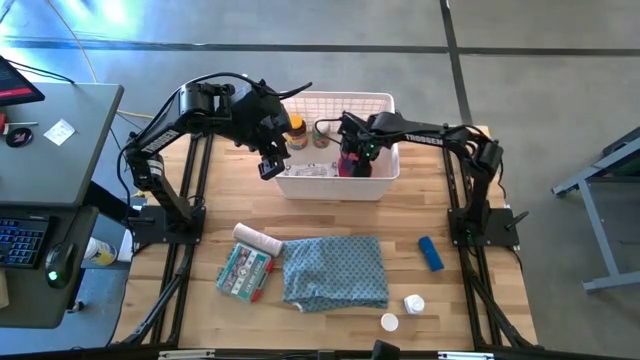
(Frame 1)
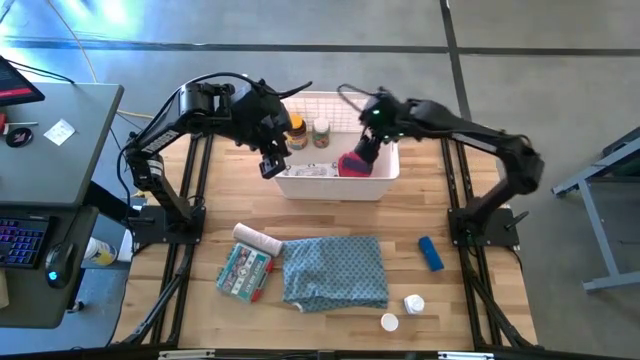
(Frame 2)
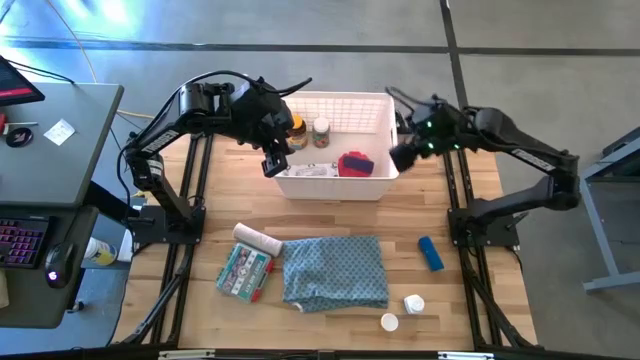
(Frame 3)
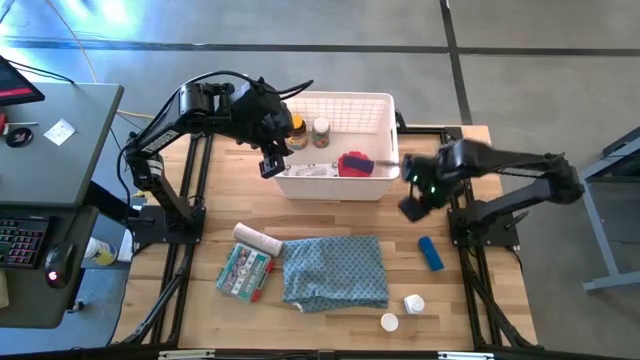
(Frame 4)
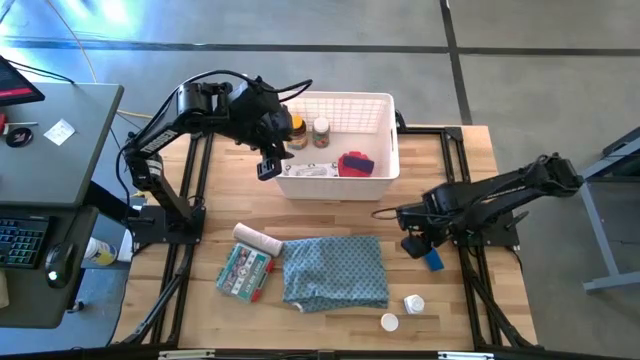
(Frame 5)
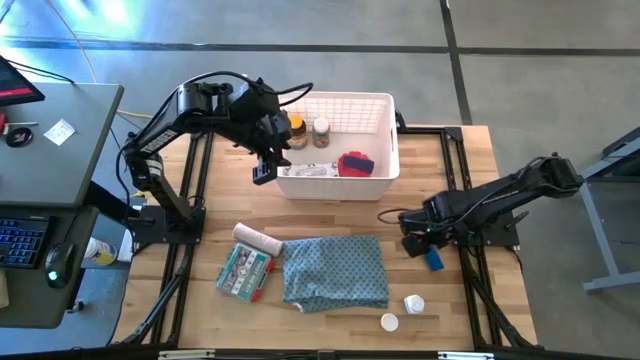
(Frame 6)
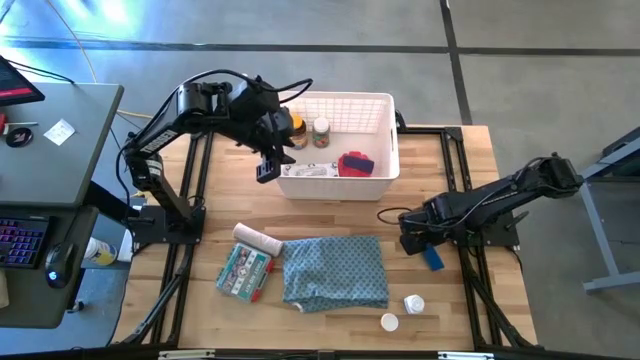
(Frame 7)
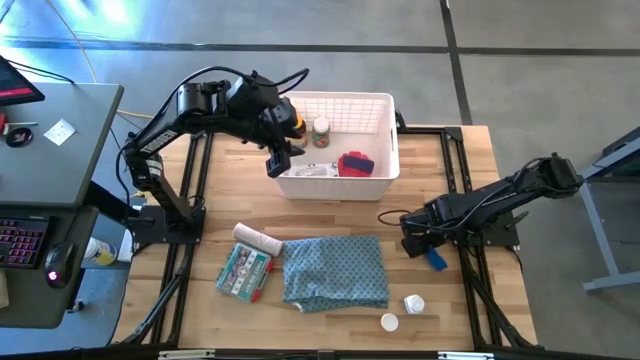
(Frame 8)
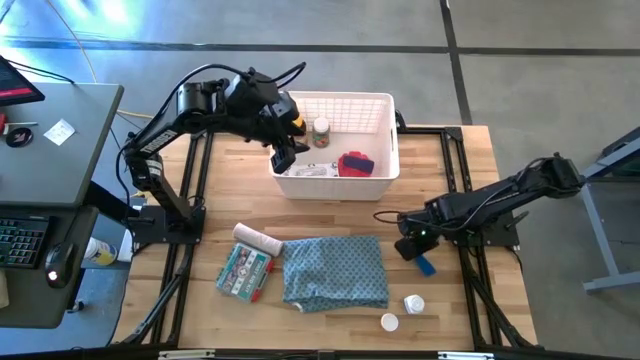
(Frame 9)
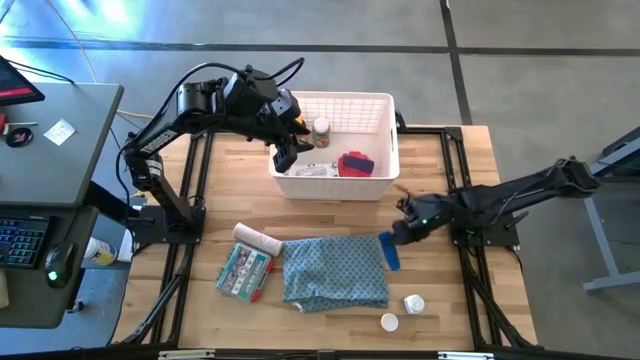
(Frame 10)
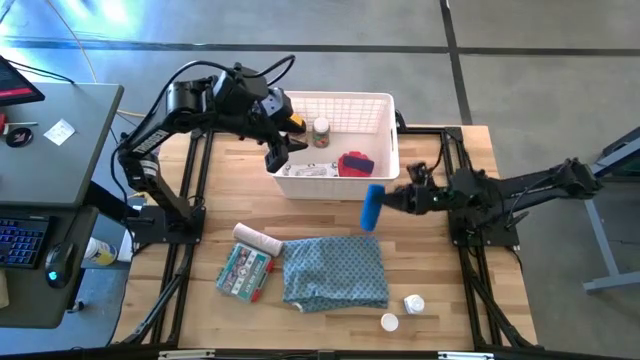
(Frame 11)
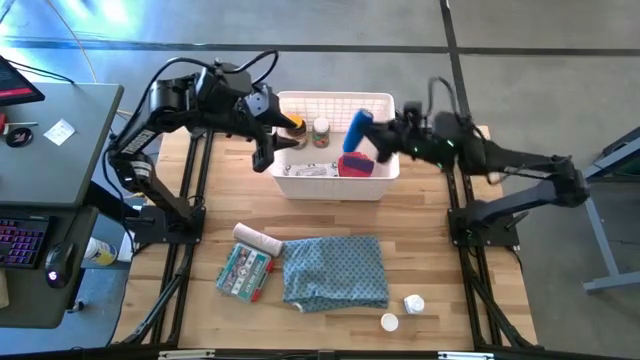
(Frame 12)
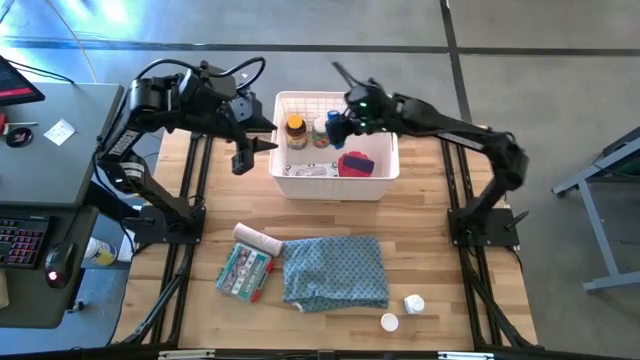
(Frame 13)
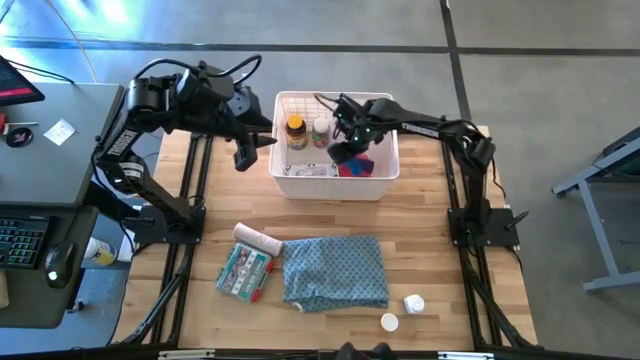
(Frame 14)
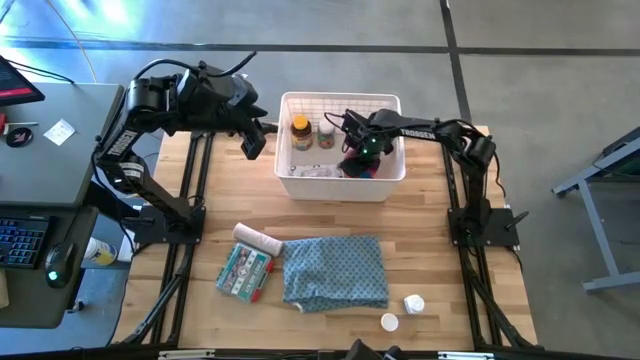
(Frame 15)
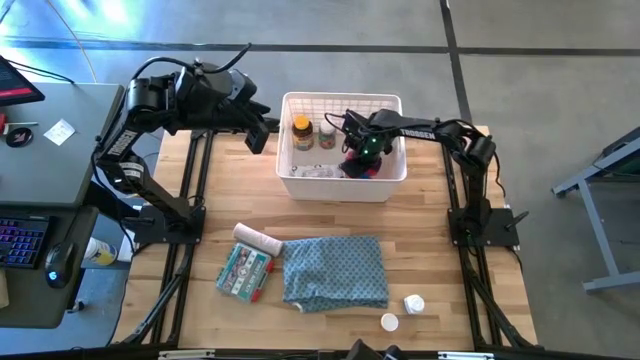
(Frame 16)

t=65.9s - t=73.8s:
Task: Pick & place medical supplies in basket/bin
Put the blue bandage into the white bin

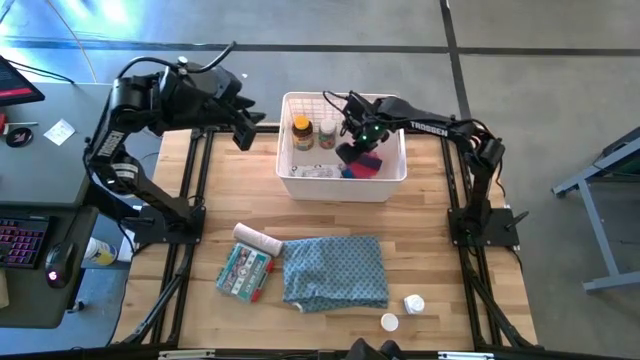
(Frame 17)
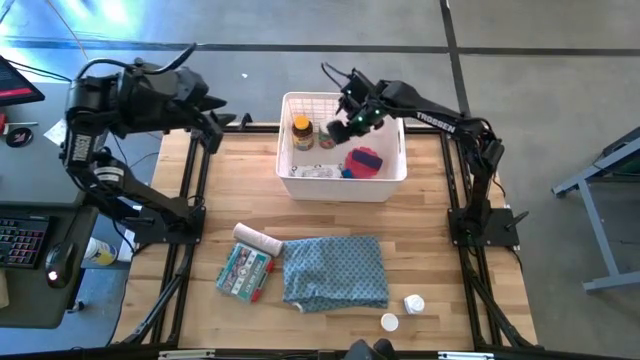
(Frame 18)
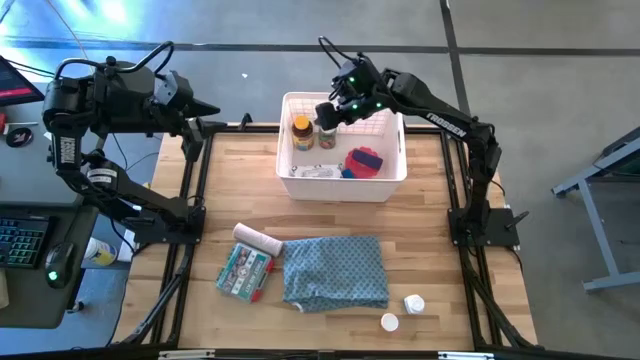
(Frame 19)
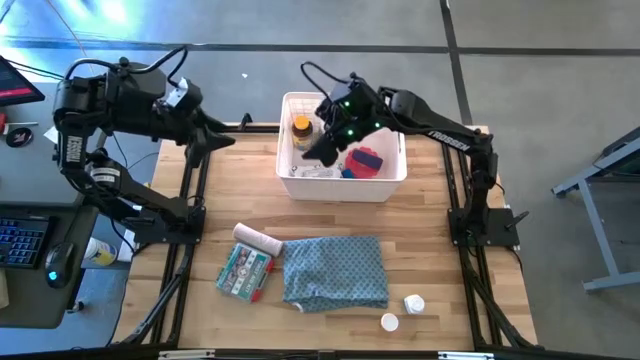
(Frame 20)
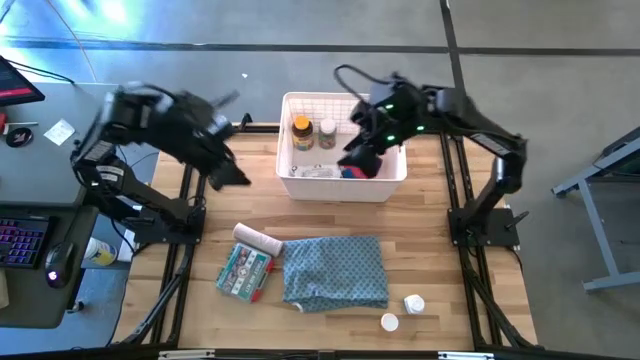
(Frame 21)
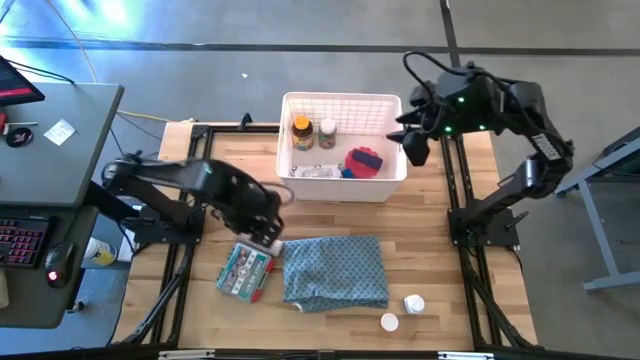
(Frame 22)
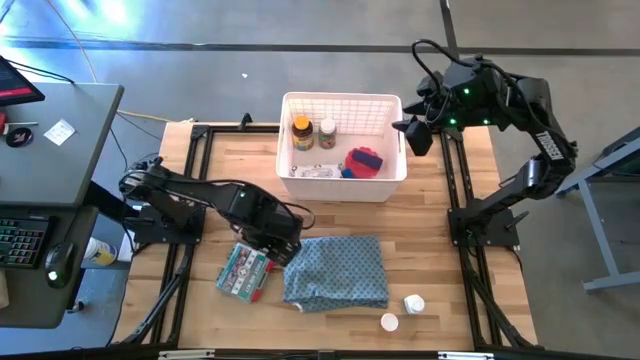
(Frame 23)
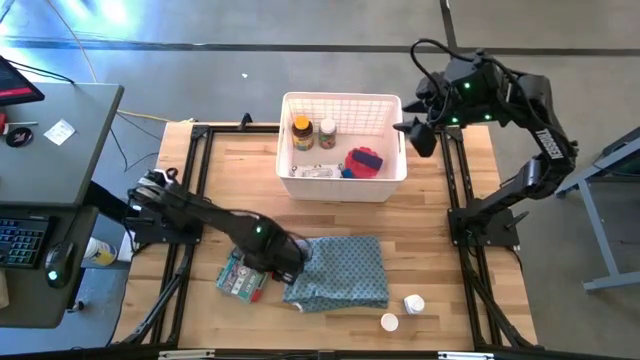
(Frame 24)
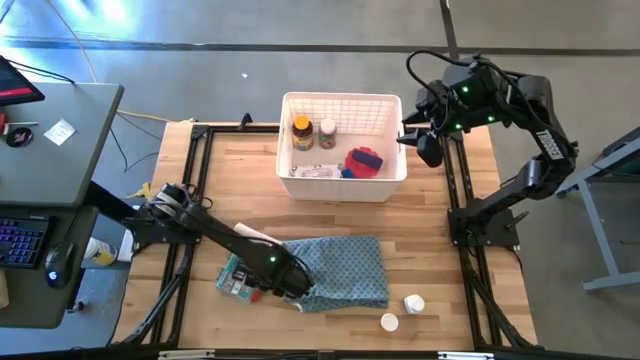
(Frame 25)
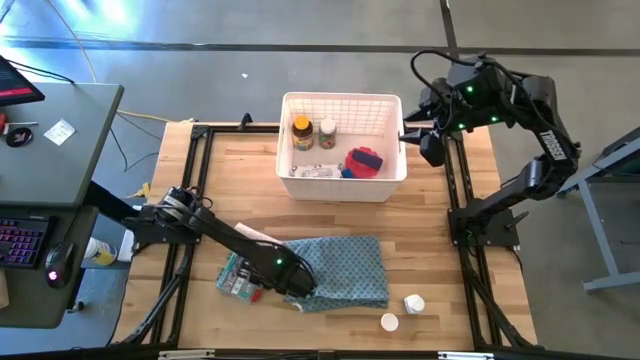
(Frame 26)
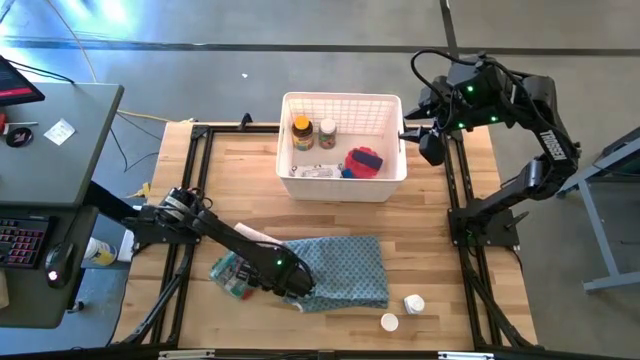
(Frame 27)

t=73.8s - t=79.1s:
Put the first aid kit into the white bin

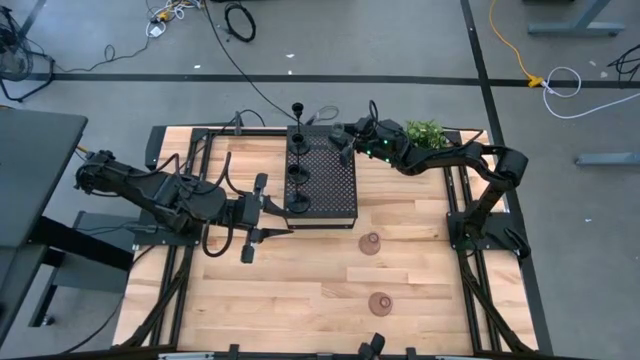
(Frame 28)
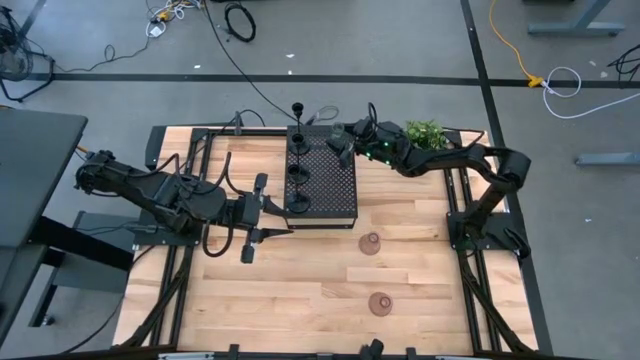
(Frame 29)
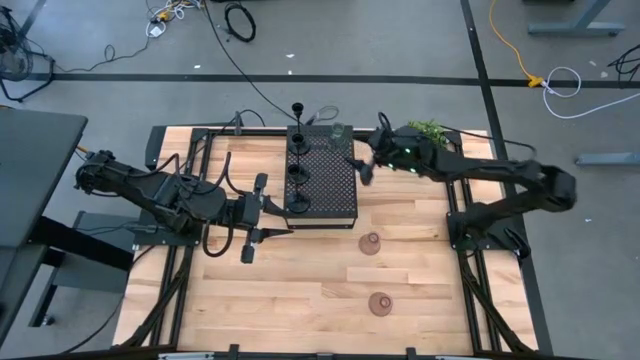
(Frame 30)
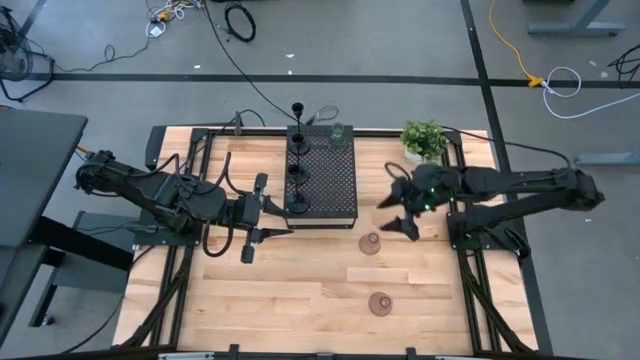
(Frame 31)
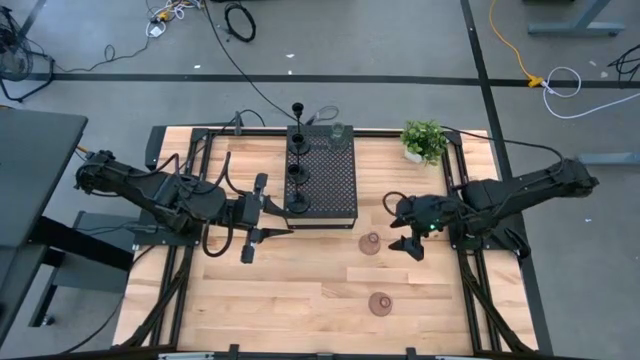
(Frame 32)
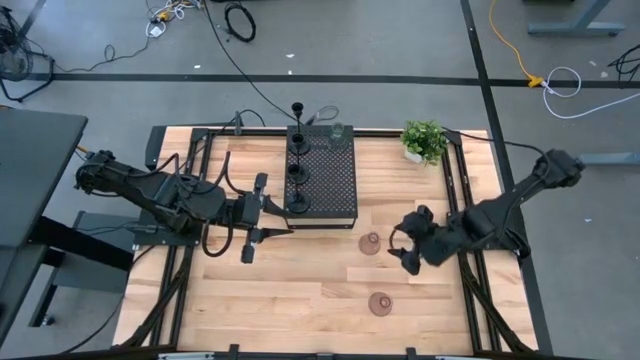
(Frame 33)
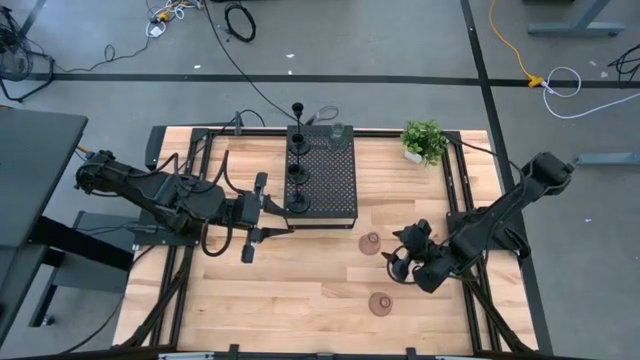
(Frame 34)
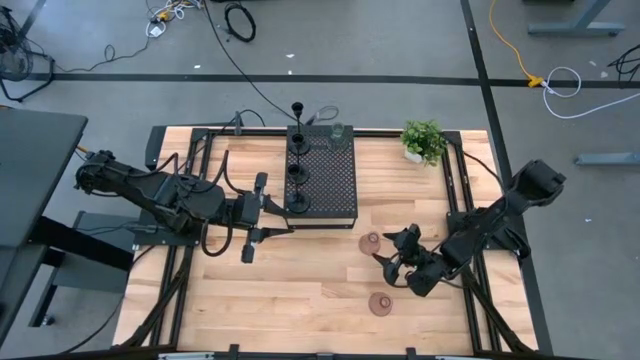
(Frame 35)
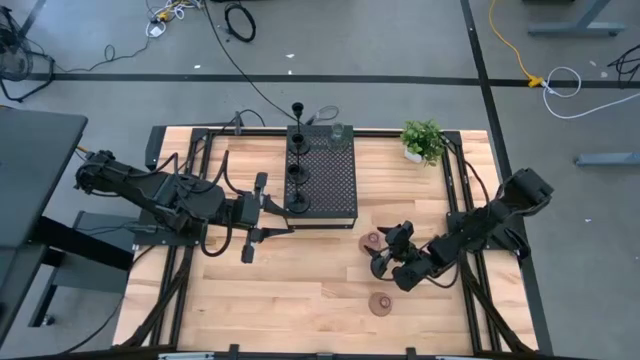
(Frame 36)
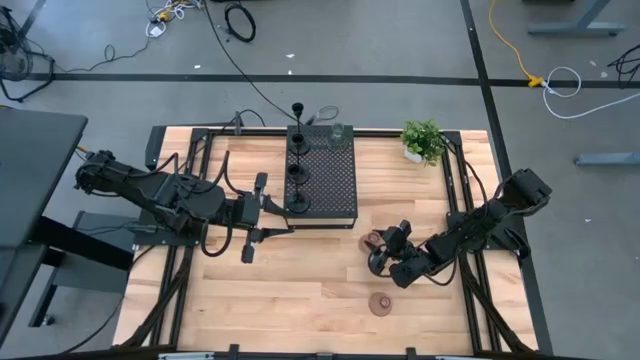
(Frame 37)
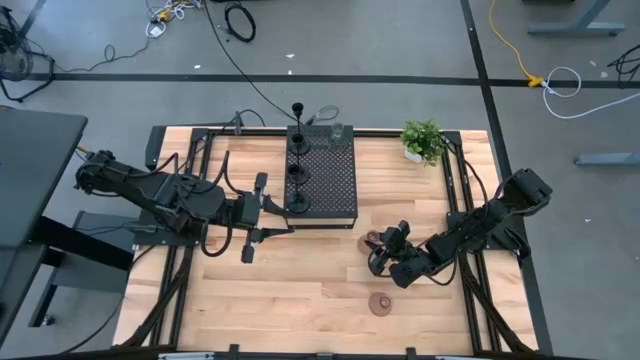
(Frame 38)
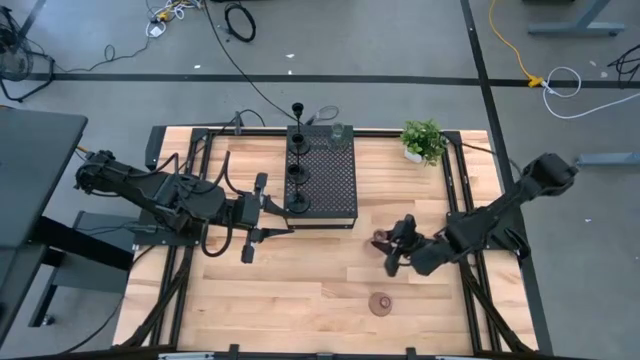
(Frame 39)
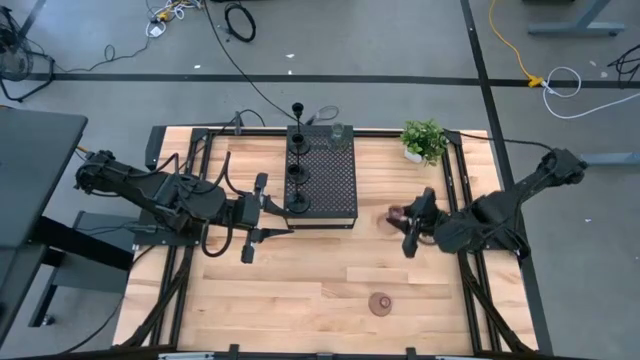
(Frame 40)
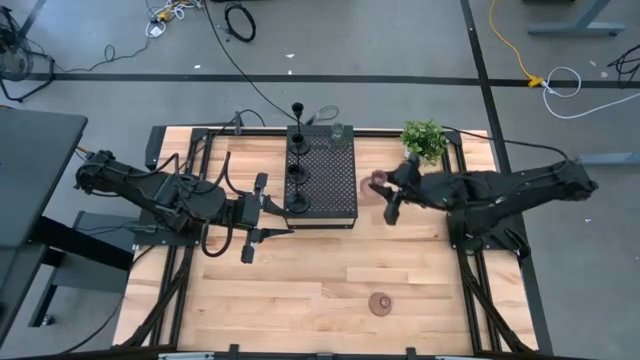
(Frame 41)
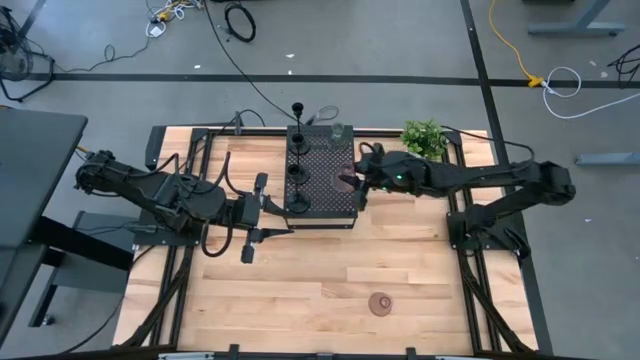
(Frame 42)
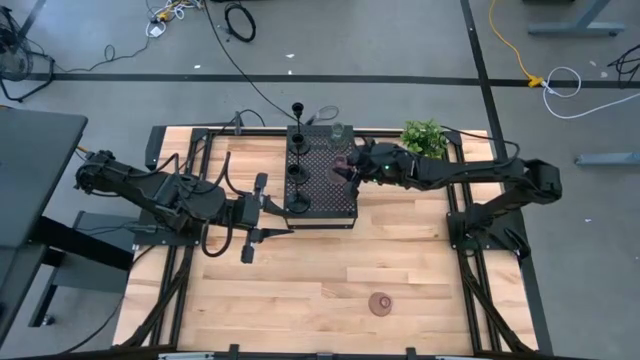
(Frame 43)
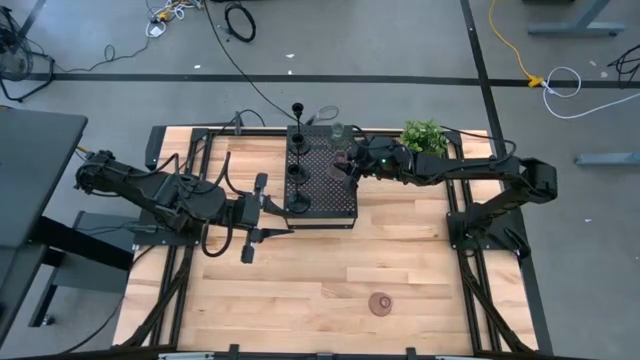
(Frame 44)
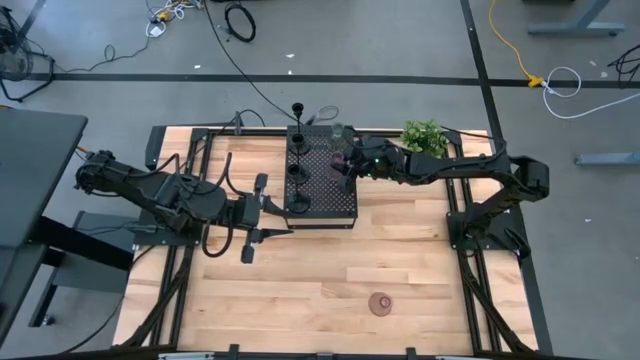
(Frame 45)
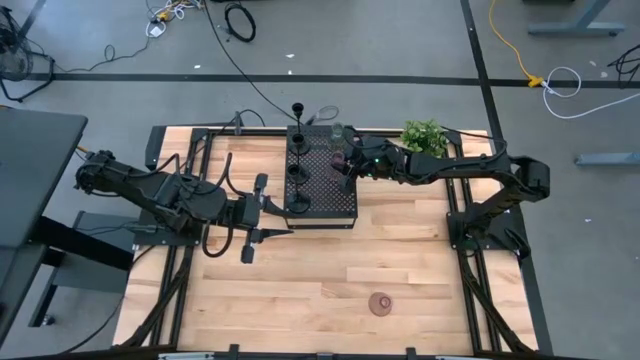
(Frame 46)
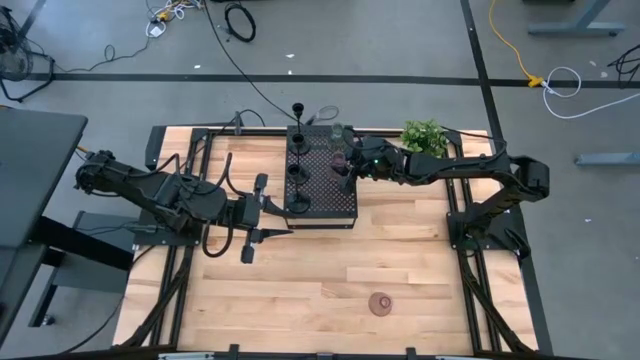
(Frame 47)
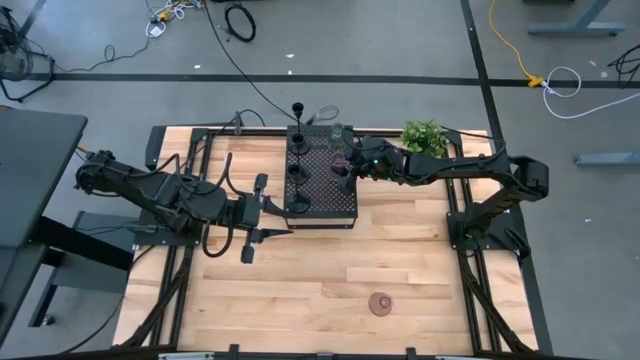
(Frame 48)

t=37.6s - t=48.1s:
Task: Pick & Place candle stick holders
Put the top pink candle holder on the shelf
